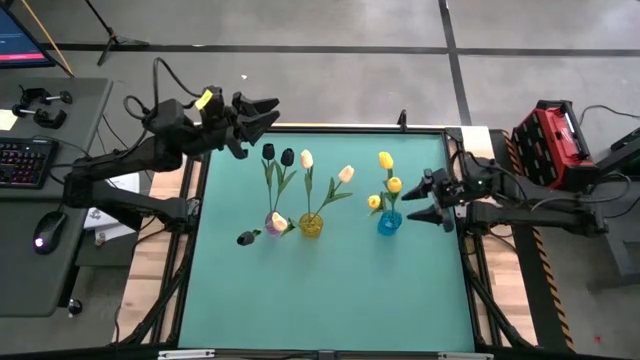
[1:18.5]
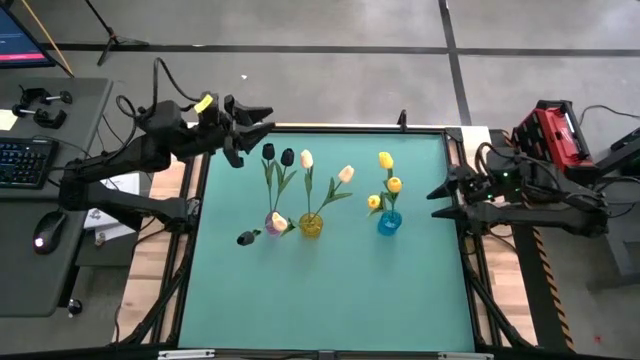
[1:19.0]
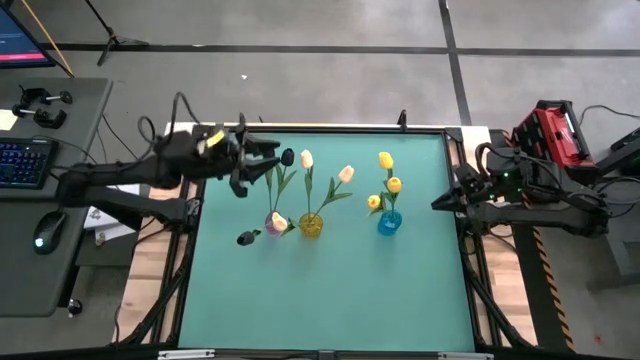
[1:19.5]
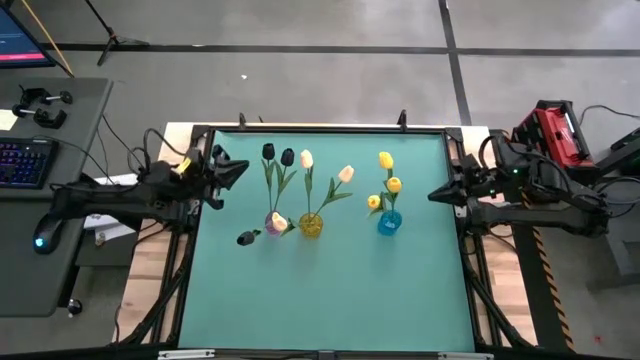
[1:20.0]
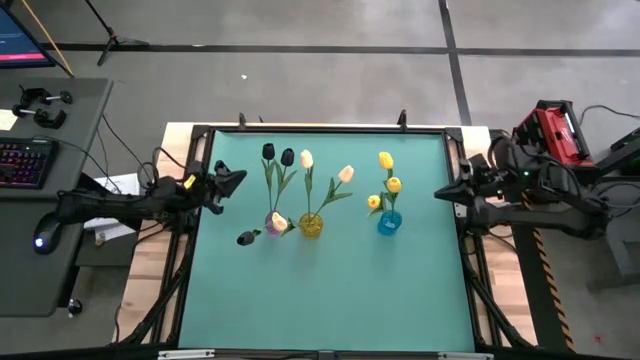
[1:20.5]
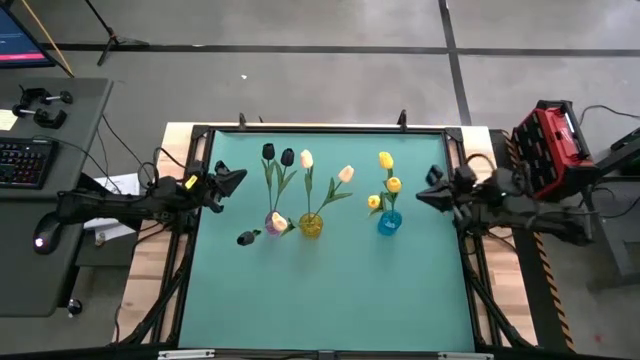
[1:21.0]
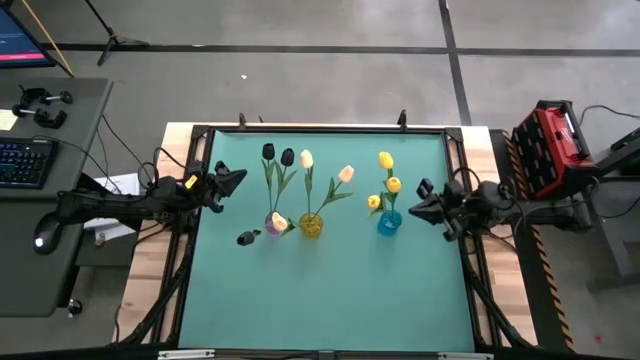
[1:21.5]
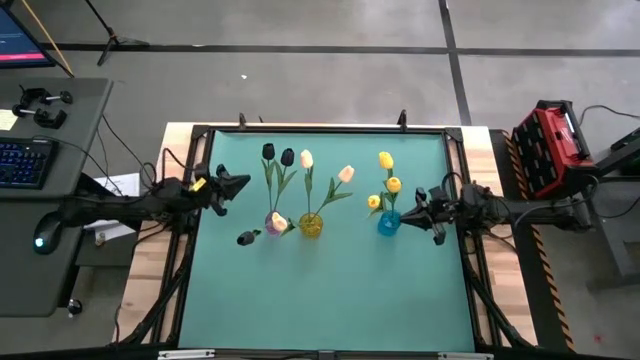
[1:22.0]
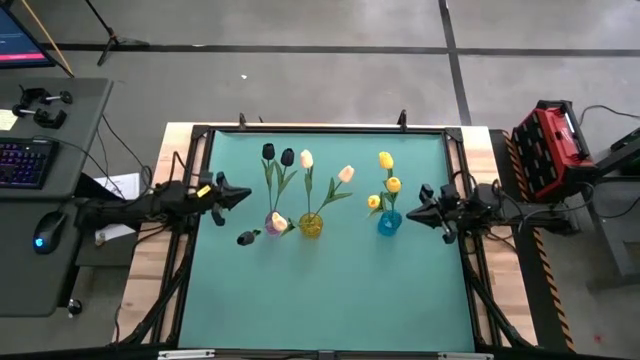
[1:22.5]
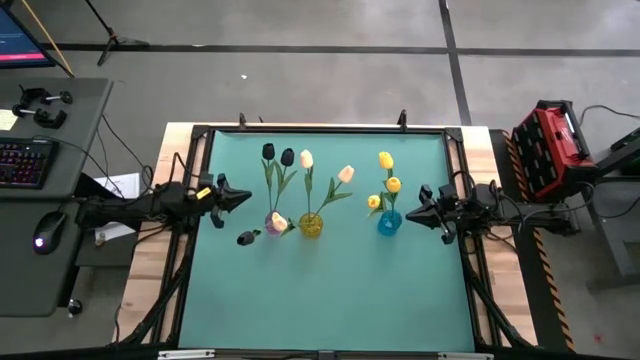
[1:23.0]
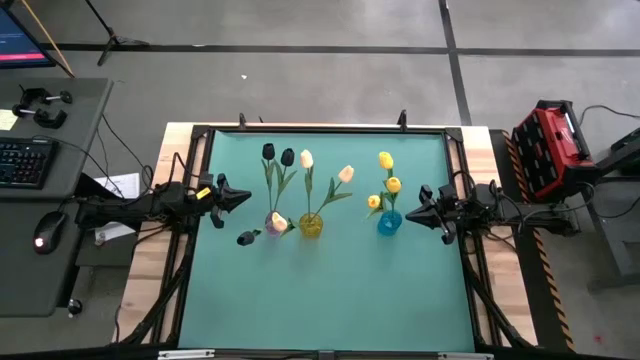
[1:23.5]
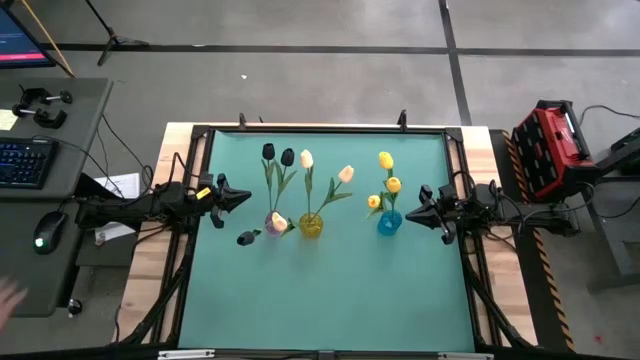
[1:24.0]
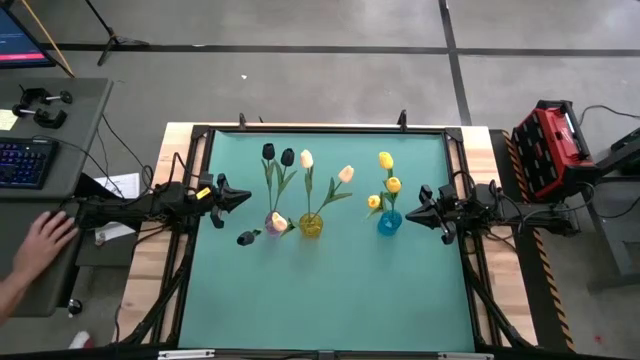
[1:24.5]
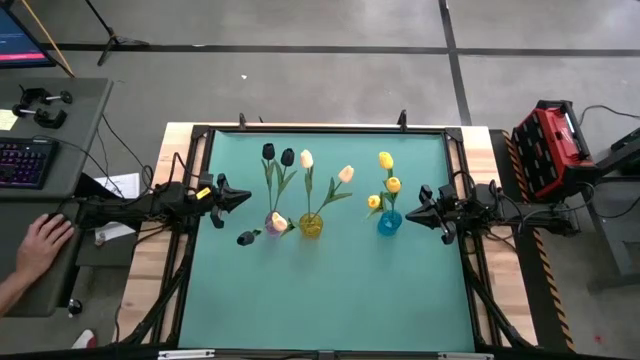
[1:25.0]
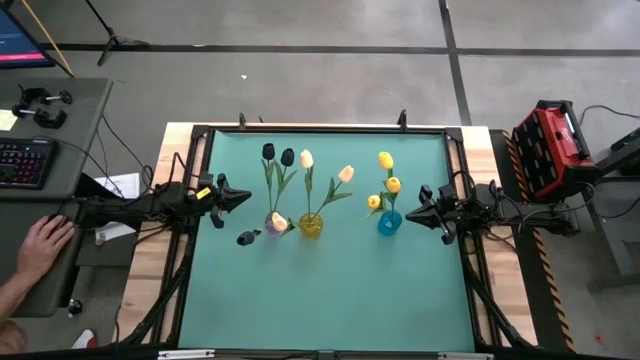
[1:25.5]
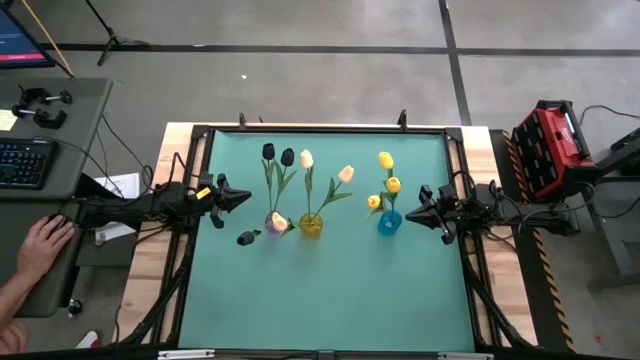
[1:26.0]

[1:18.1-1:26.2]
Task: Sort flowers into vase by color
Return to Home Position

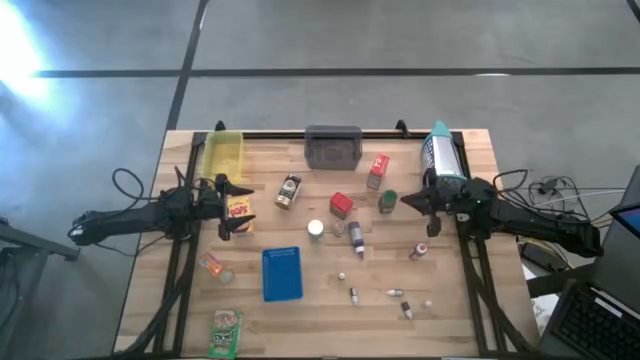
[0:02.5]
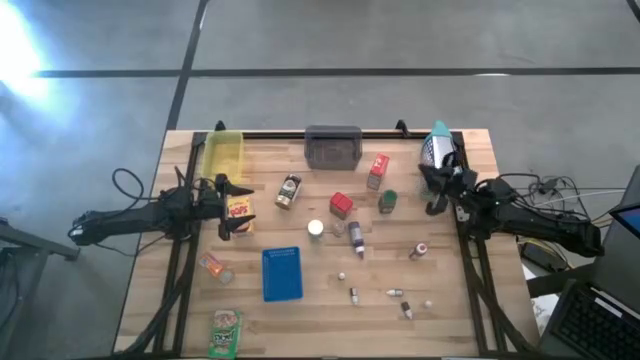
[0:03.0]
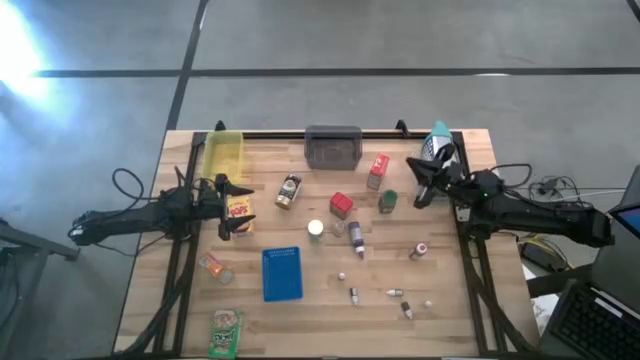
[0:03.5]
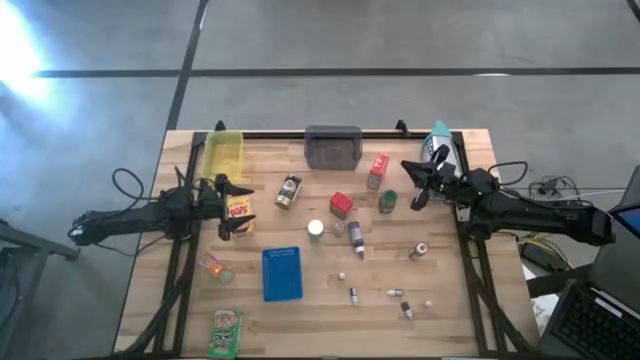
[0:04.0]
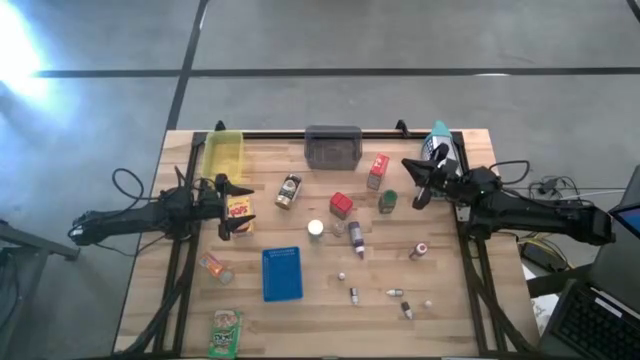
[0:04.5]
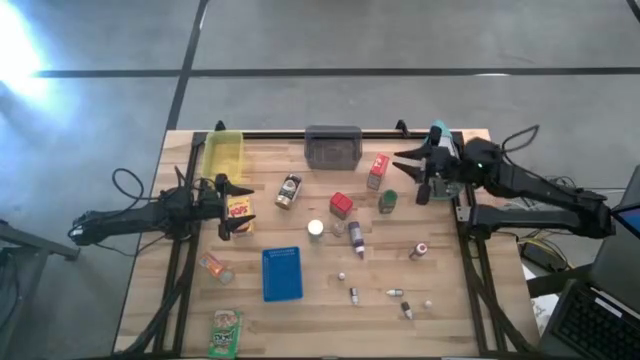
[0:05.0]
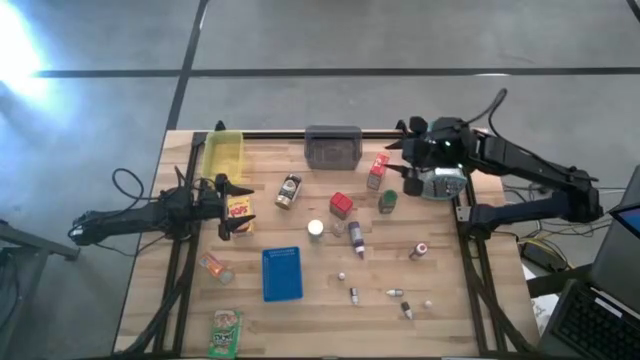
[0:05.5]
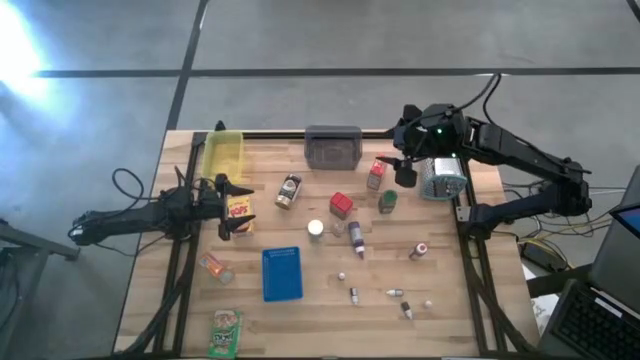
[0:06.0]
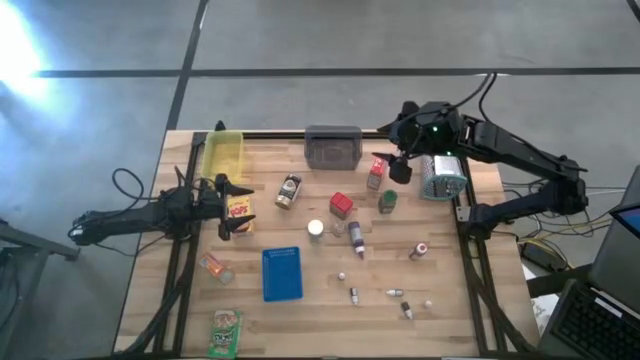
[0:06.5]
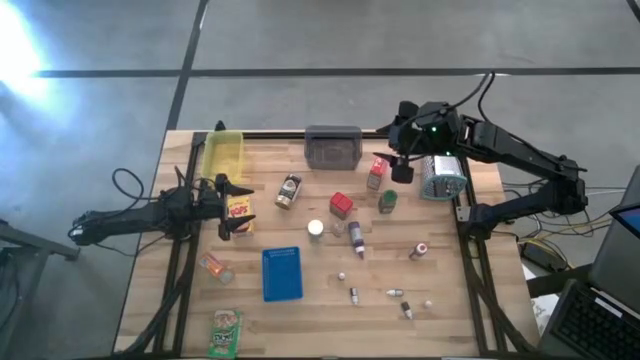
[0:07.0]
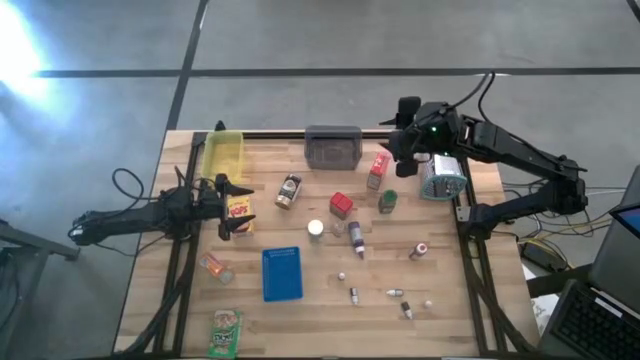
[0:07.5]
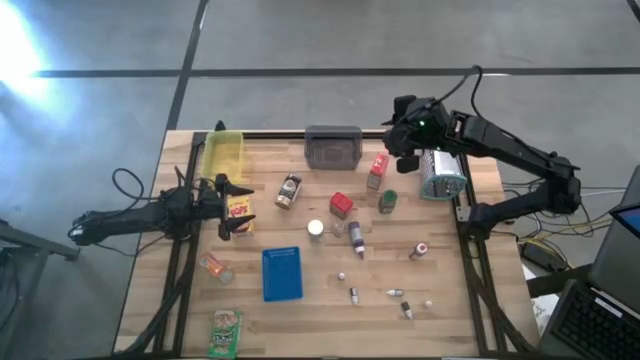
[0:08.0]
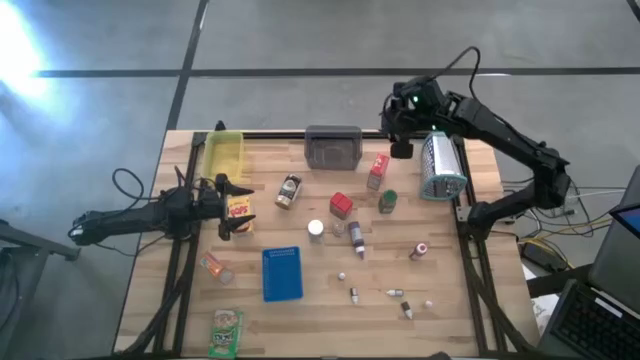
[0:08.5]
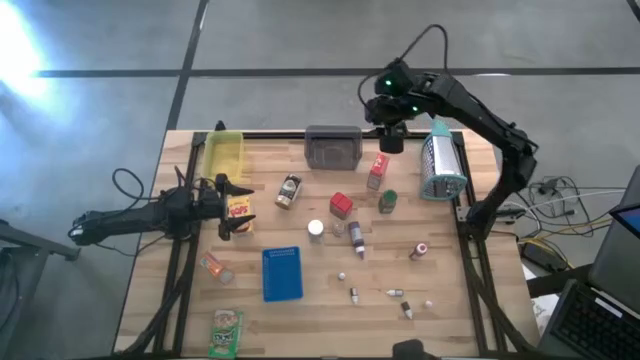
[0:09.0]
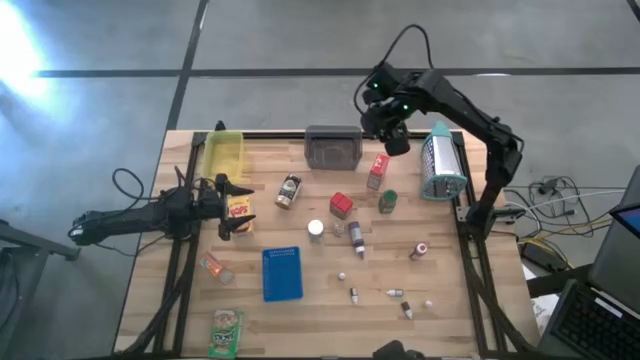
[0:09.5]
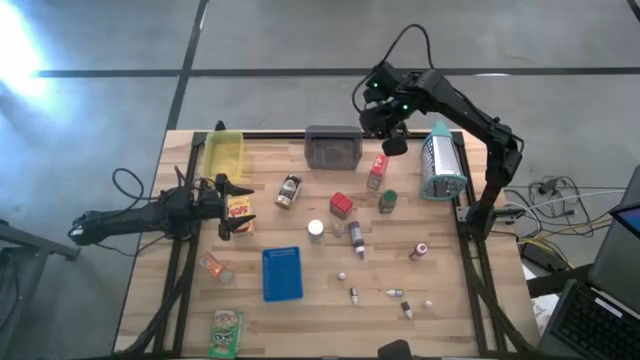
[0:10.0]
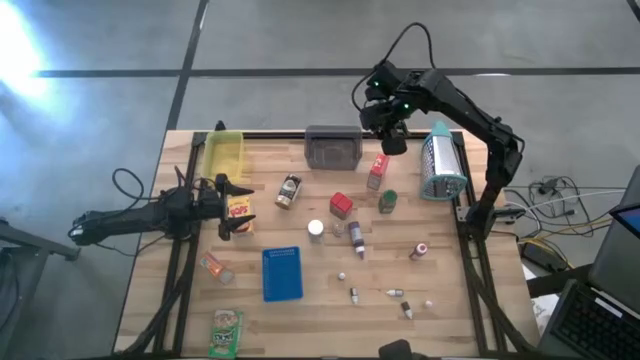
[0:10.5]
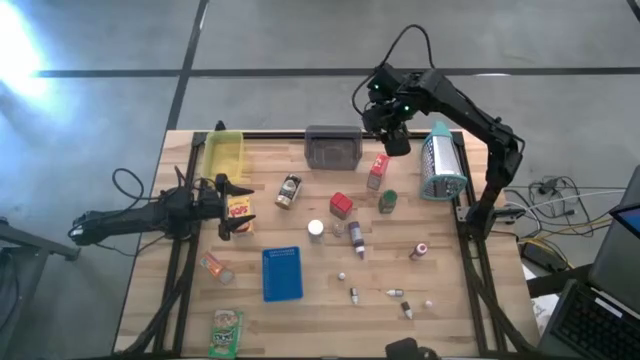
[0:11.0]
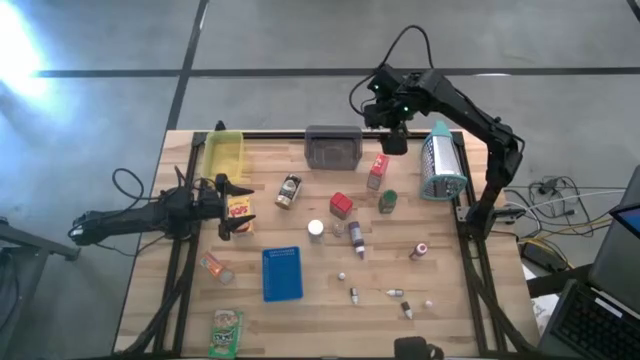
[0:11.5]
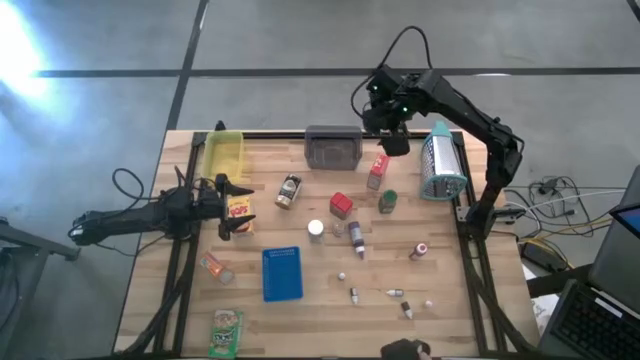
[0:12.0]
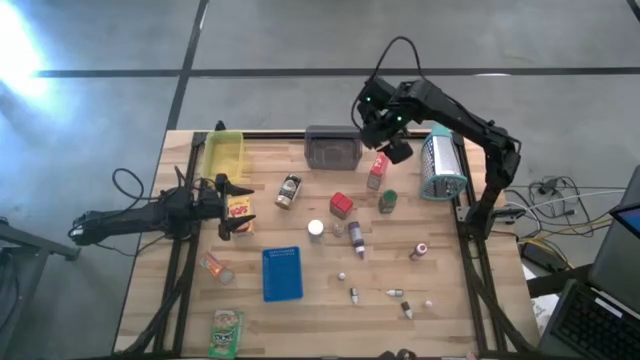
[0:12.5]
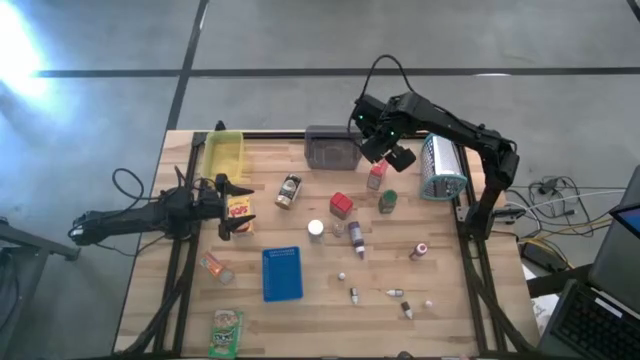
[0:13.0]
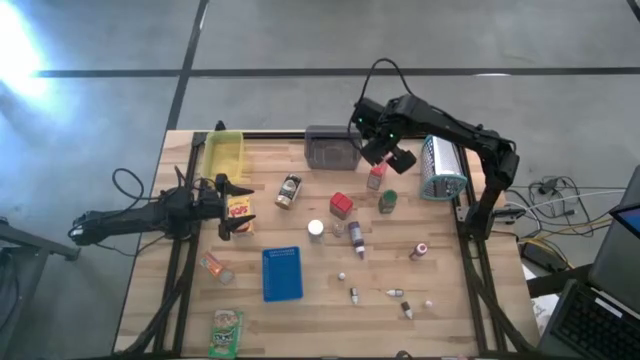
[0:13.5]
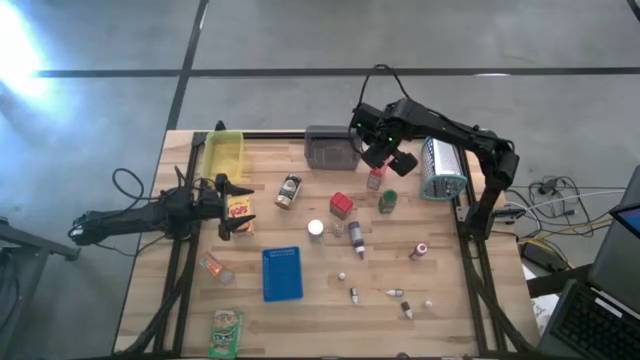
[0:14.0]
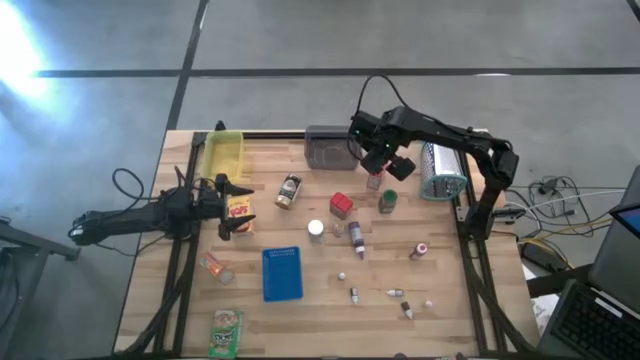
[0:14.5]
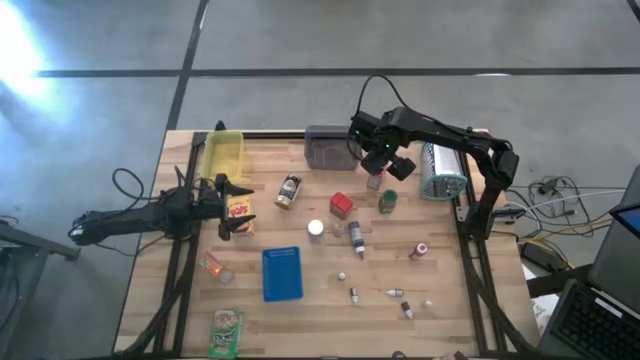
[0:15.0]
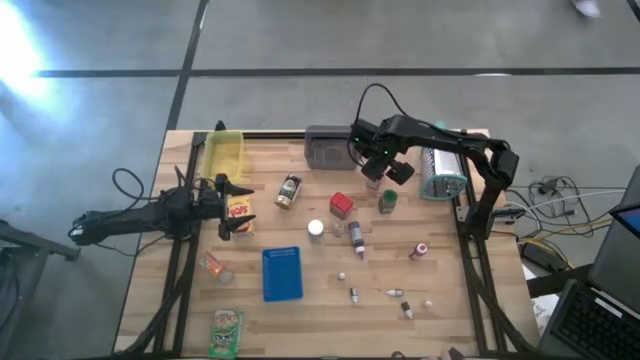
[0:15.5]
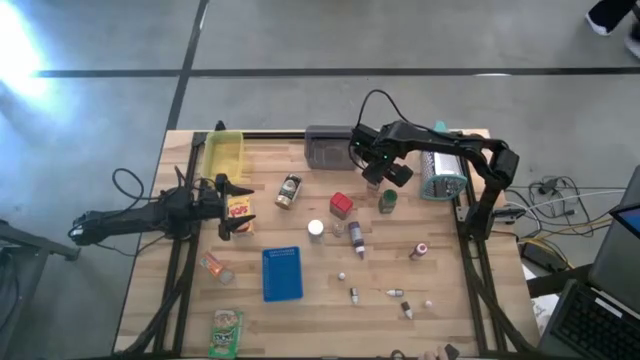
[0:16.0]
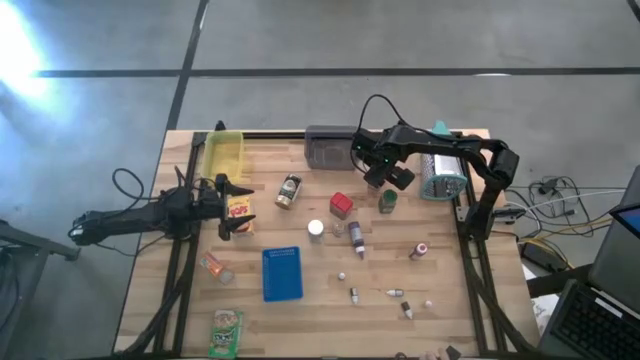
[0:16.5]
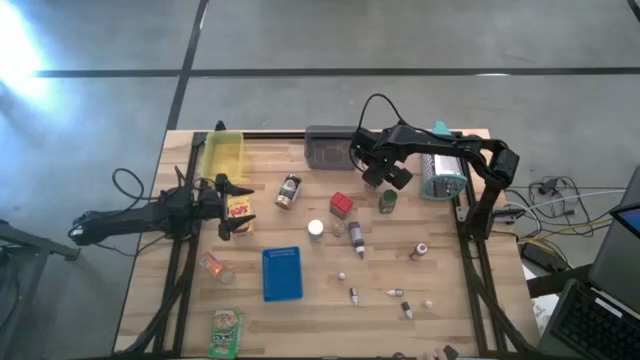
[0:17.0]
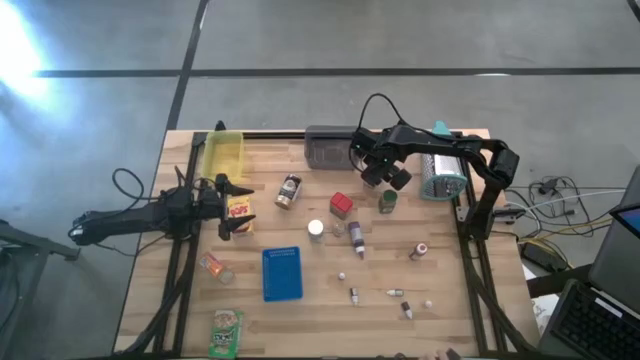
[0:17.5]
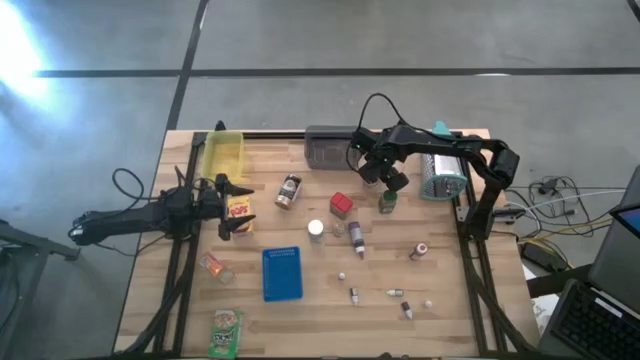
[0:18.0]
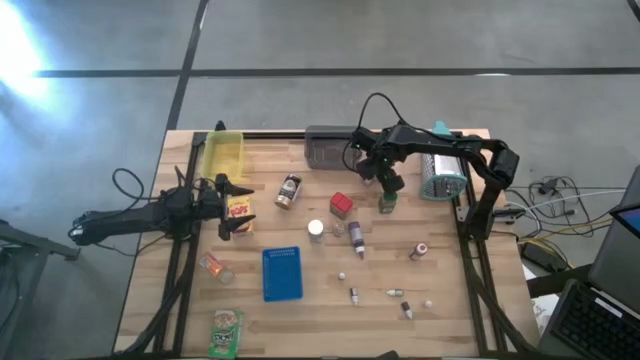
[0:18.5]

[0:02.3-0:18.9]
Task: Pick & Place Kitchen Items
Put the red cereal box into the yellow bin
